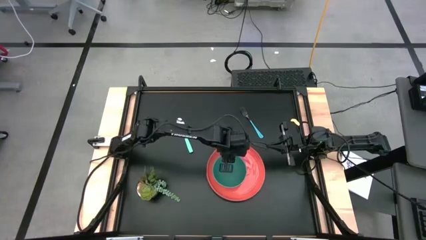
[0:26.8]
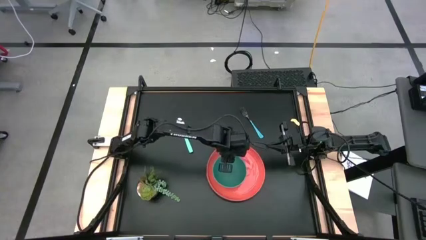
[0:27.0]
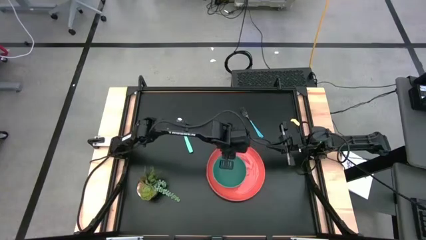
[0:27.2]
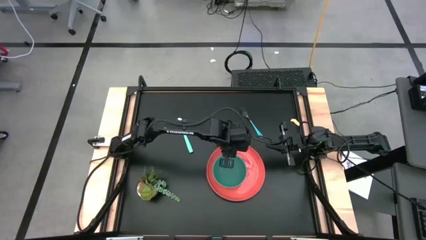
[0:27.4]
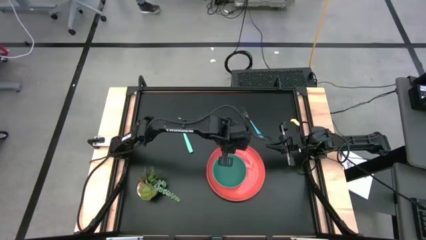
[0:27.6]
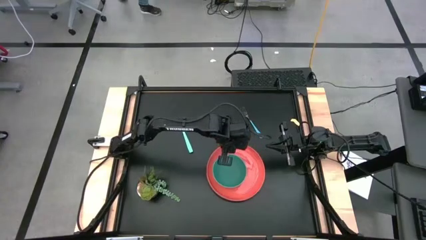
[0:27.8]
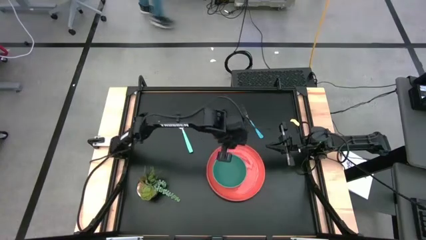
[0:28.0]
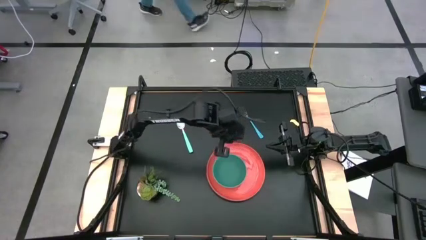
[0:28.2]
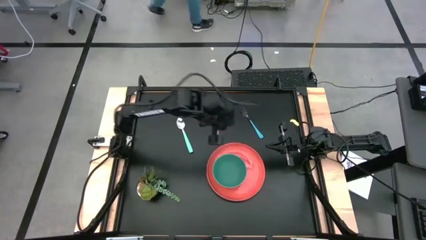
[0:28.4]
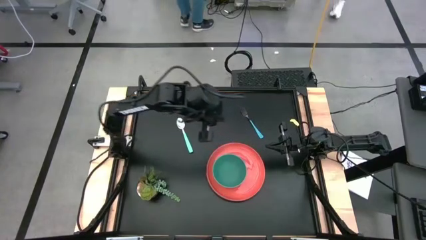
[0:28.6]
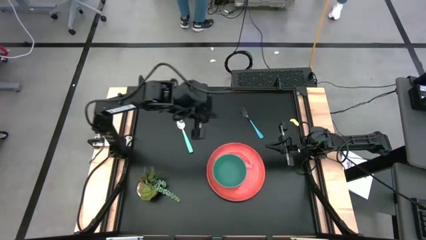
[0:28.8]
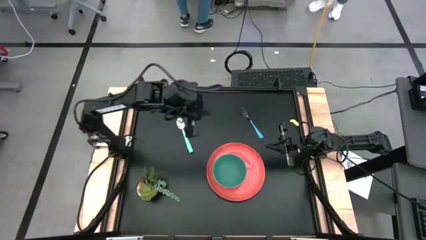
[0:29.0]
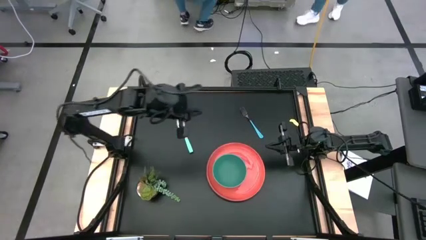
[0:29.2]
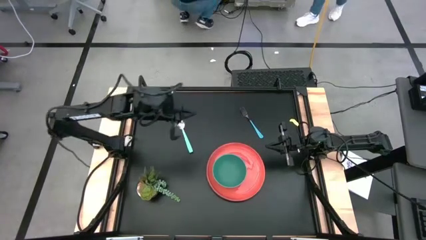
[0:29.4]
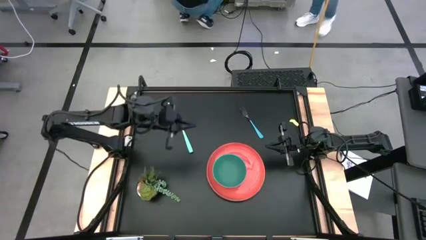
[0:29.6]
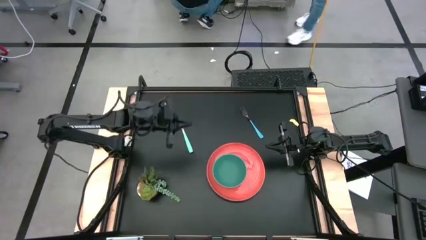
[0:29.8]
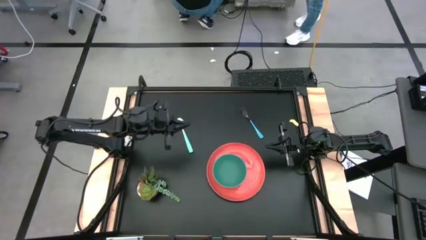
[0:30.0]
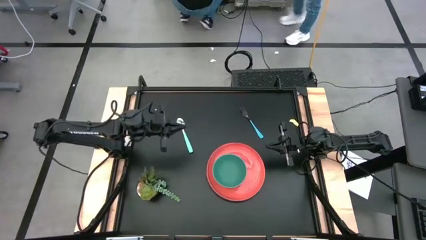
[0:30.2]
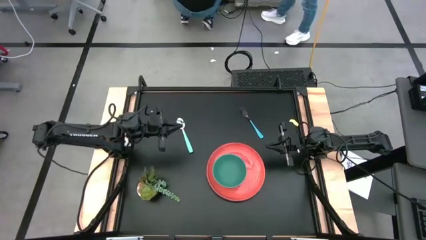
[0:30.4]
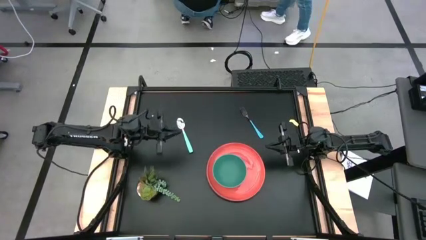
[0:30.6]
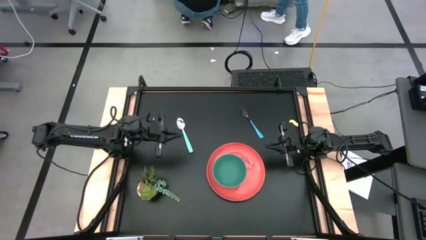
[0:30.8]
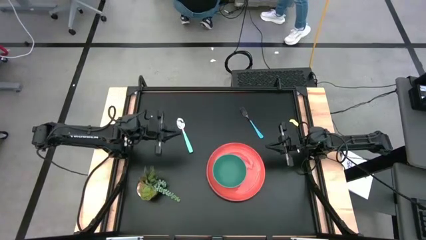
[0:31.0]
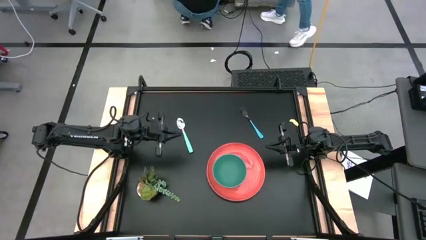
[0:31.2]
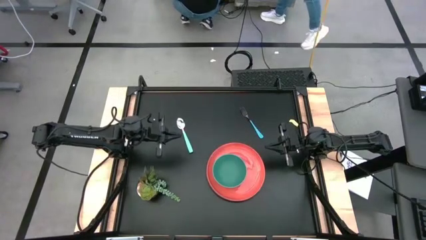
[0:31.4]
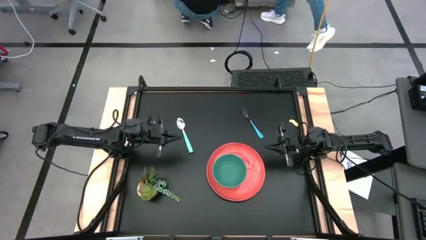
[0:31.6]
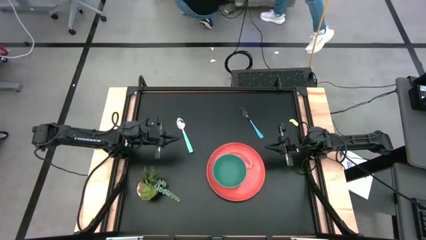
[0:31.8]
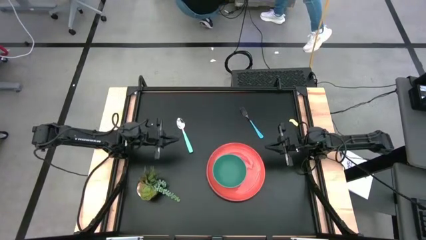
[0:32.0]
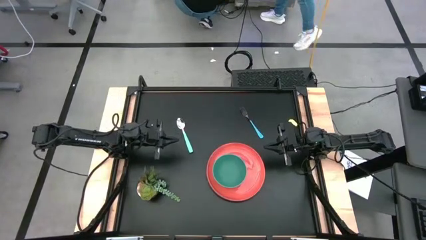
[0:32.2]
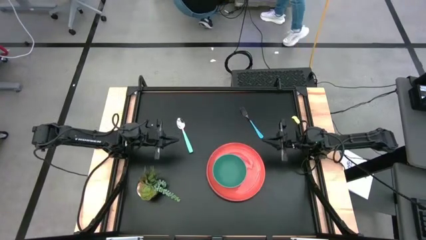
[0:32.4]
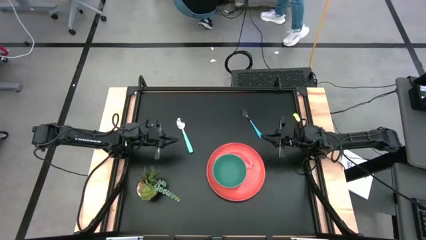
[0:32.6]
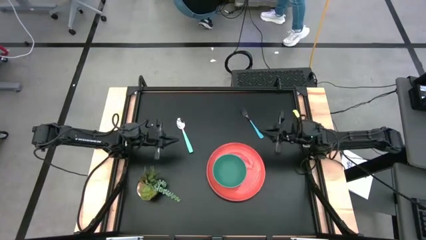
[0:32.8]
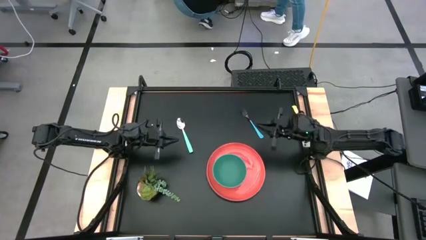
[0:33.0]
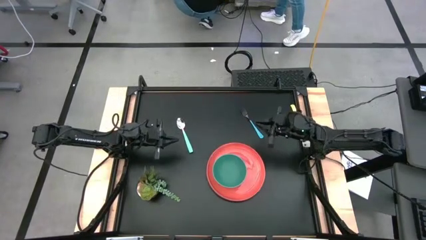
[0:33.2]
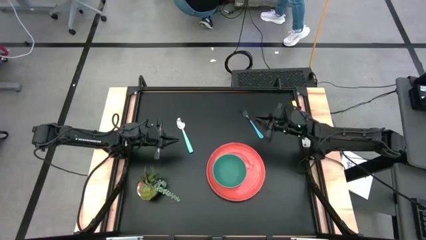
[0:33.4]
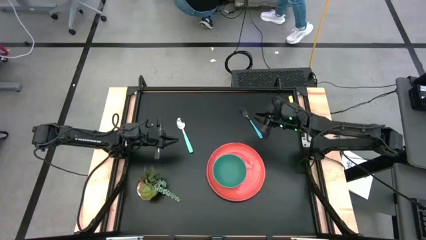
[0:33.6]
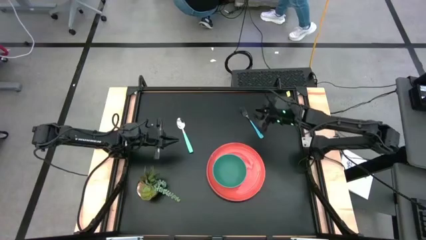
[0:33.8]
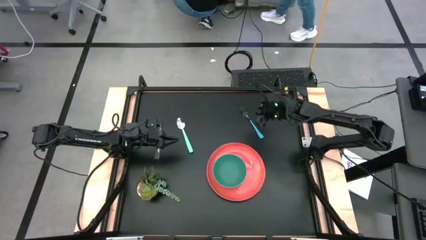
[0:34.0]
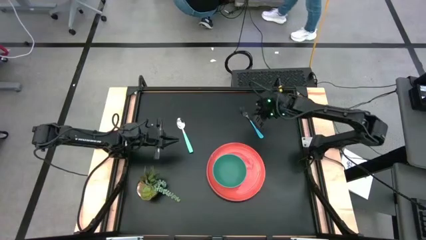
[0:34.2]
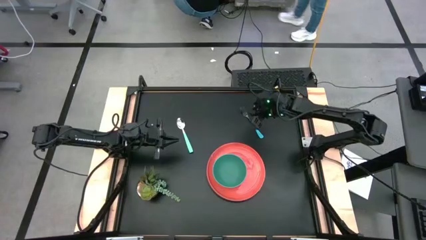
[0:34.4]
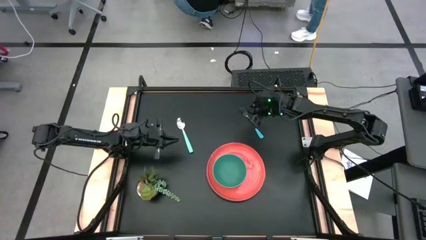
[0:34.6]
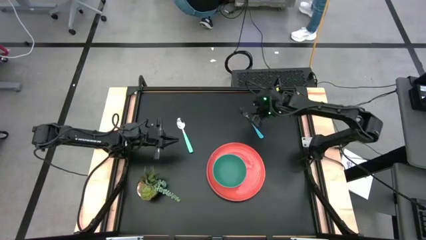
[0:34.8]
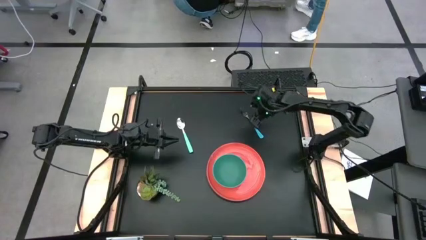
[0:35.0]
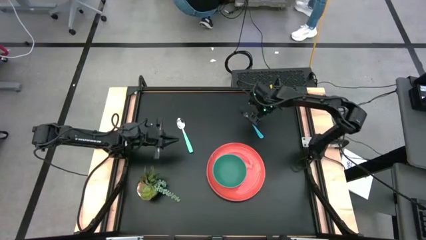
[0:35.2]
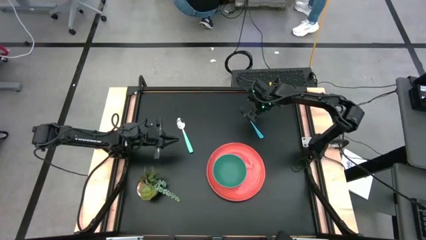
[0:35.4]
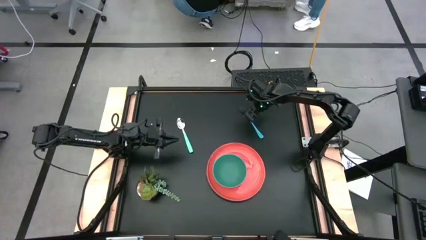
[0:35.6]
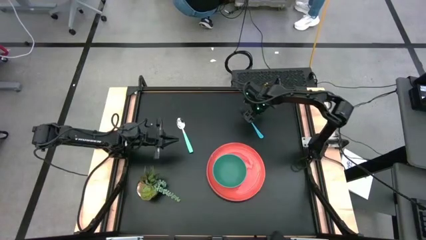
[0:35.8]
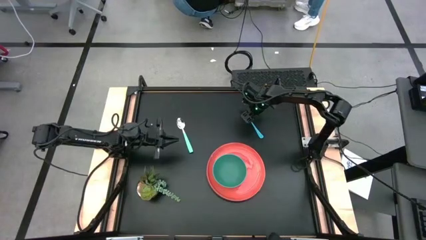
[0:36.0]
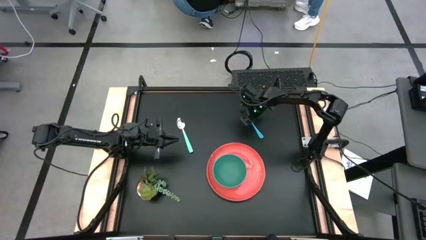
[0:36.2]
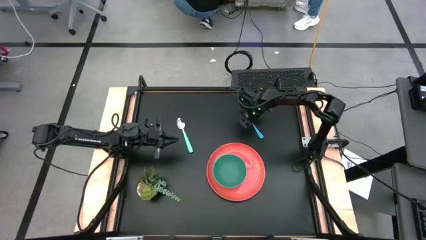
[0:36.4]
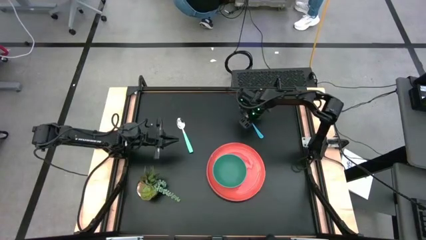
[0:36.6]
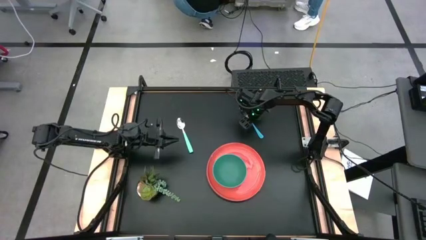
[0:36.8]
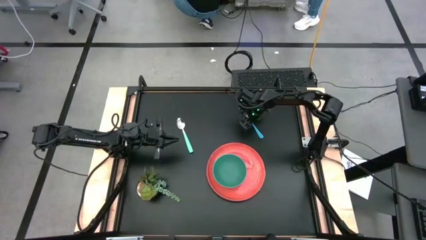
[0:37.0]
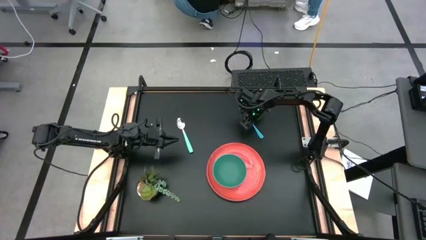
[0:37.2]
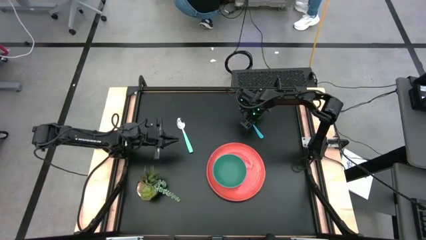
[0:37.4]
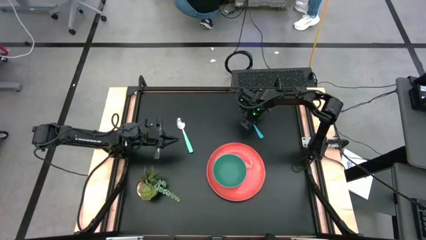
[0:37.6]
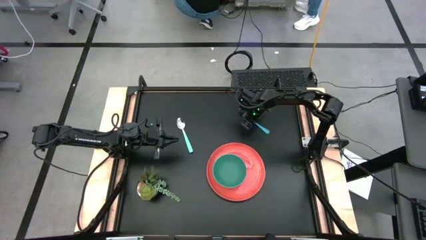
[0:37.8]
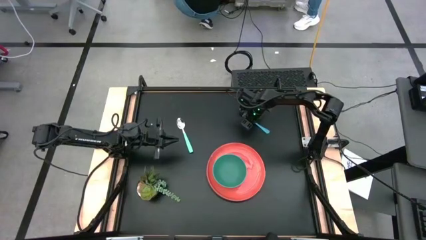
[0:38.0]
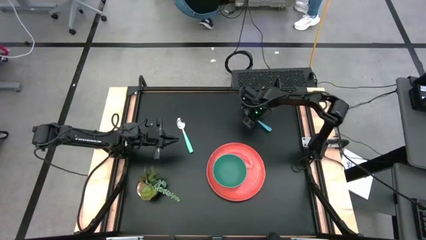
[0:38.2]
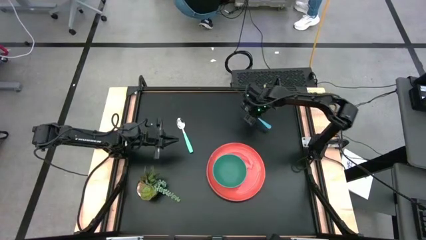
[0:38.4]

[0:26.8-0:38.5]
Task: Pick and place plate/cup/fork/spoon on tray
Put the fork on the orange plate beside the green bowl

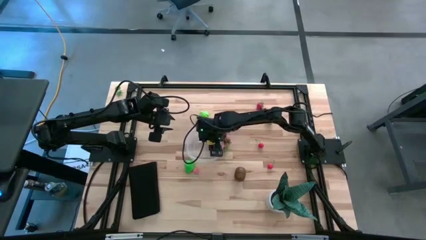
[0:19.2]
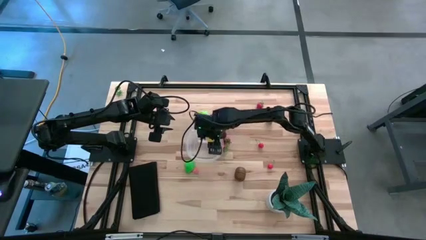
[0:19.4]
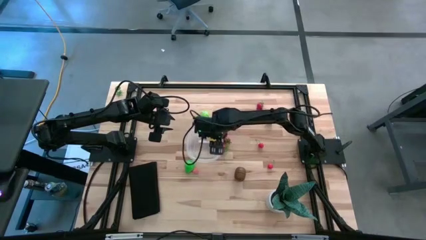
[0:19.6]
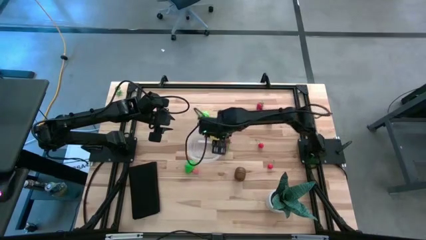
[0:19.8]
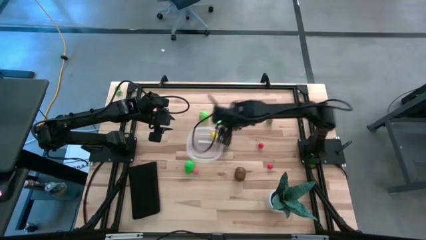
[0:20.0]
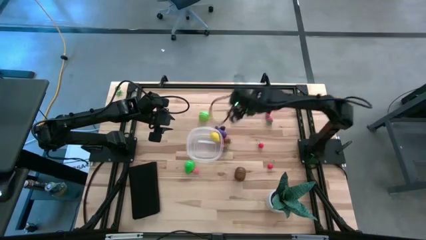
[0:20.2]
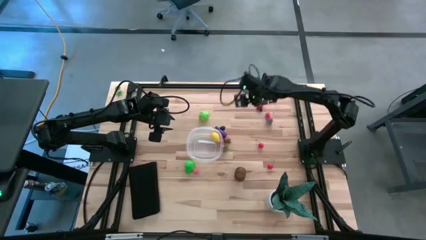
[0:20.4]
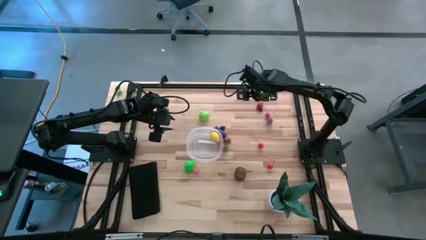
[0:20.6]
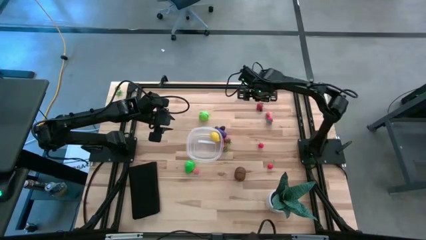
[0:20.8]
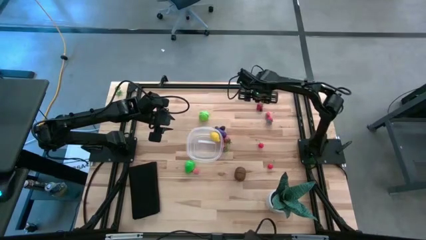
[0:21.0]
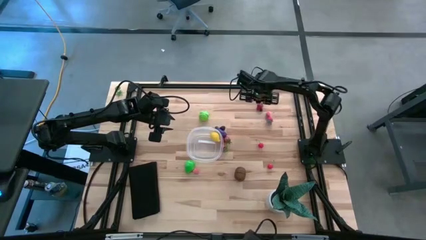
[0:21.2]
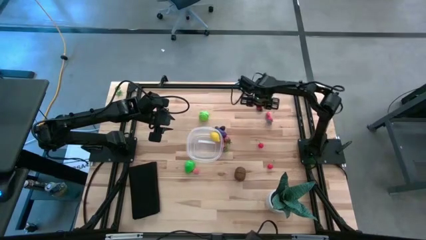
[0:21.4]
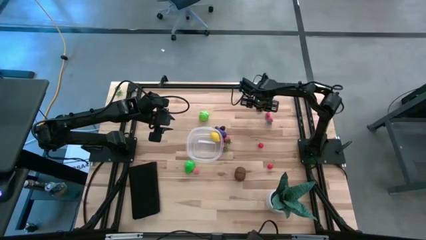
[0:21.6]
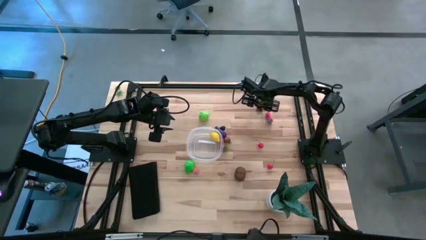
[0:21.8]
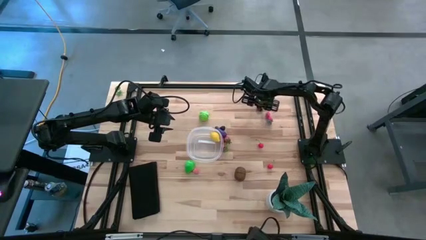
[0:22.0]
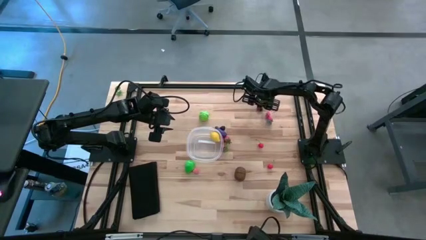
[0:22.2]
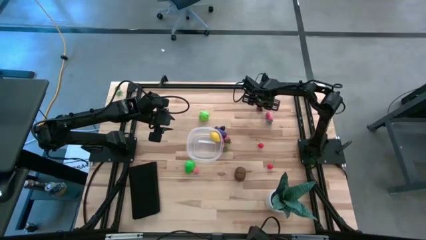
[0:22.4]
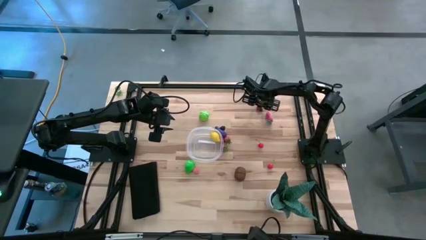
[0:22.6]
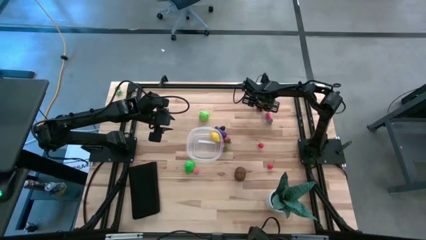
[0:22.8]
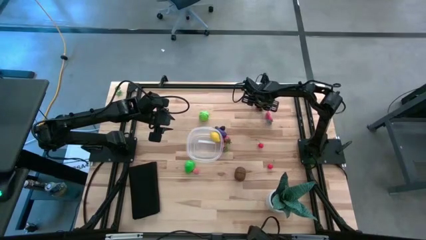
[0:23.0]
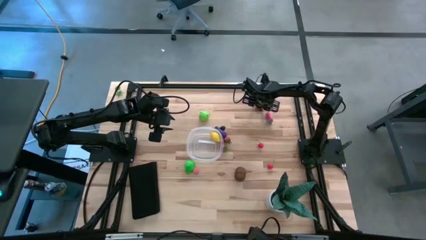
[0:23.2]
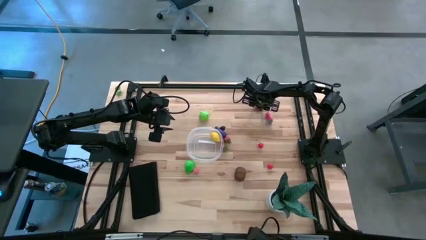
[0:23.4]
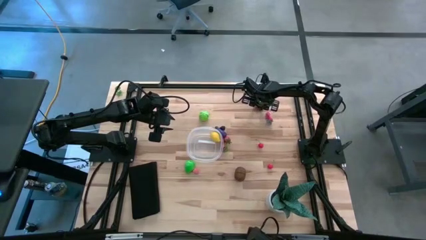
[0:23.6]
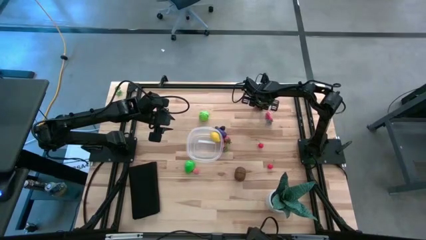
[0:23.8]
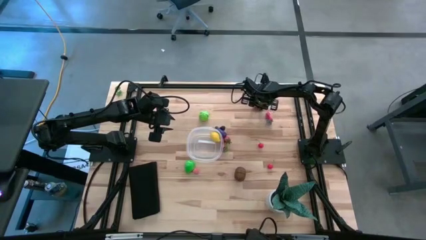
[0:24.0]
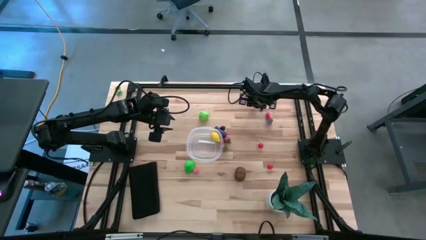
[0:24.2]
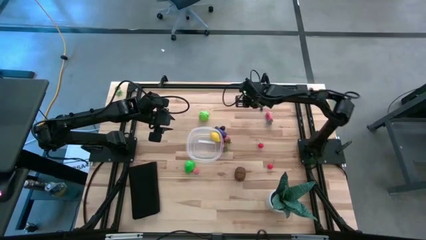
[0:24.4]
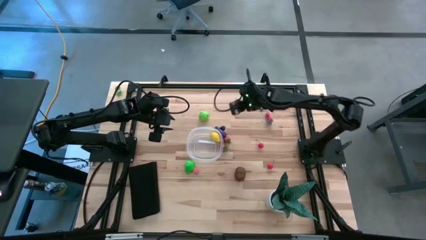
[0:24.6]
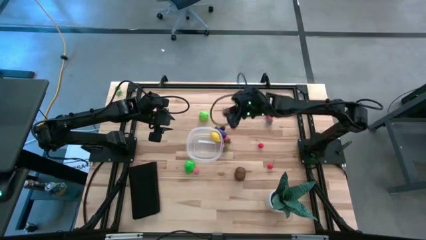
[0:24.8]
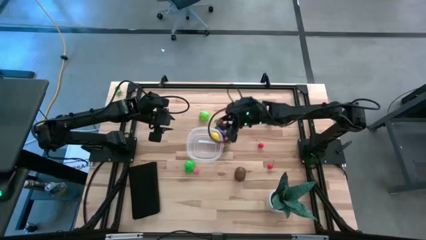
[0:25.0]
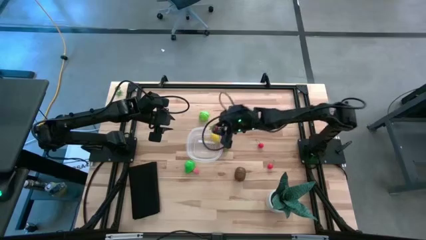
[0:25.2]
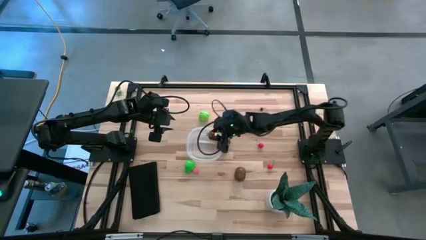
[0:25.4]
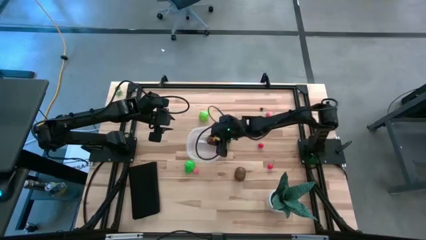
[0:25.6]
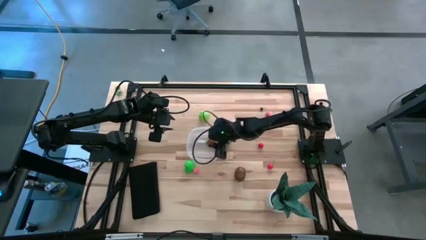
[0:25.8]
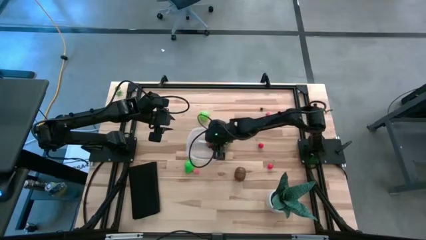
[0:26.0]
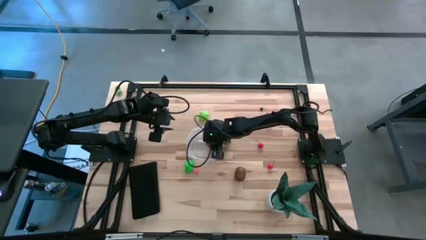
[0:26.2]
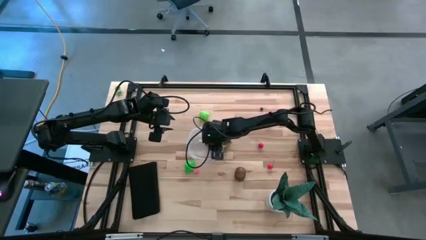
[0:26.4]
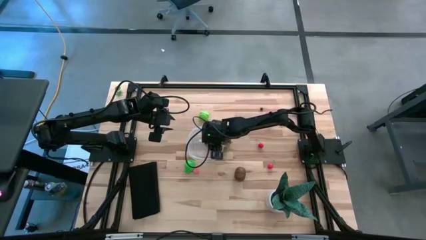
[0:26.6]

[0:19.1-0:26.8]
Task: Pick and placing Produce into tupperware
Put the top right strawberry into the transparent bin
